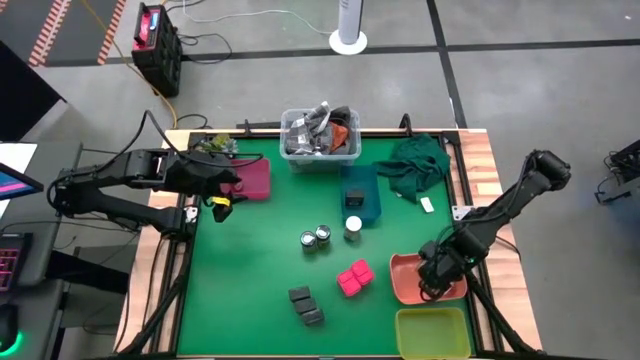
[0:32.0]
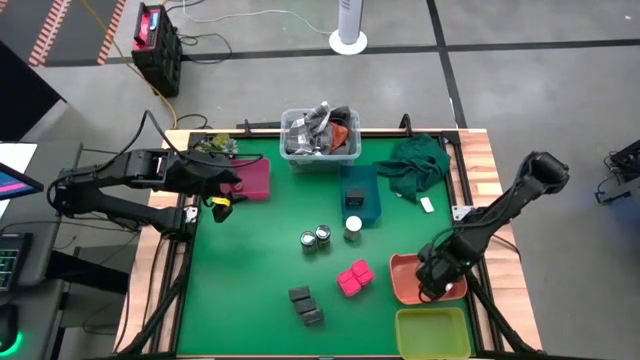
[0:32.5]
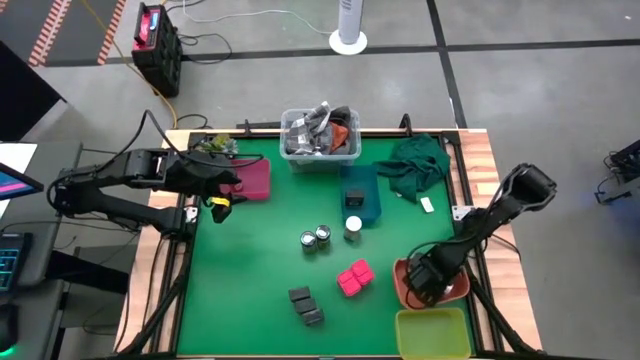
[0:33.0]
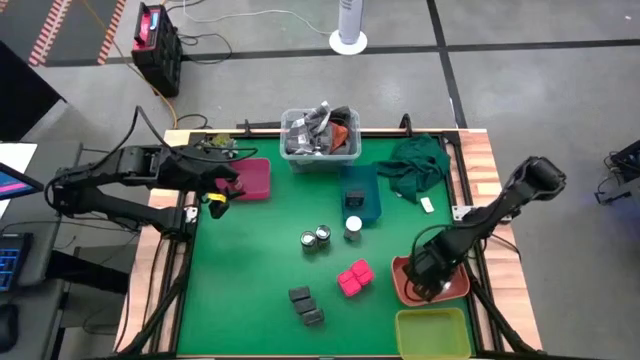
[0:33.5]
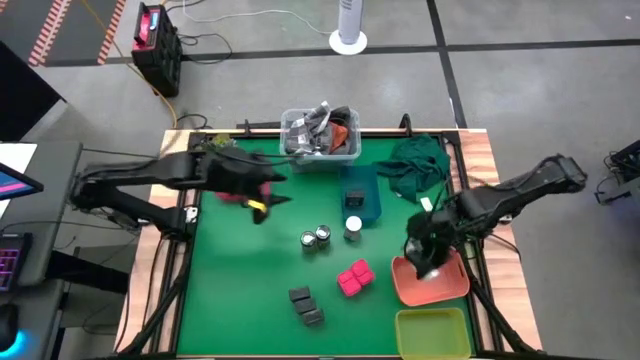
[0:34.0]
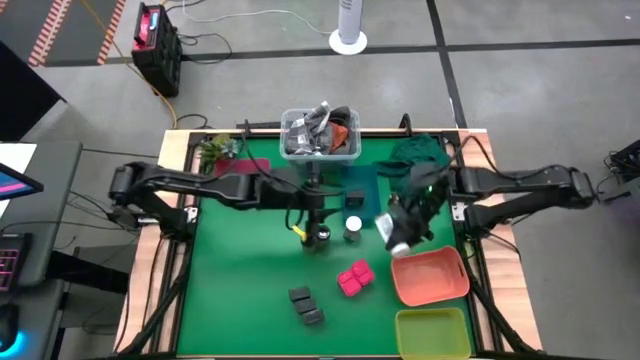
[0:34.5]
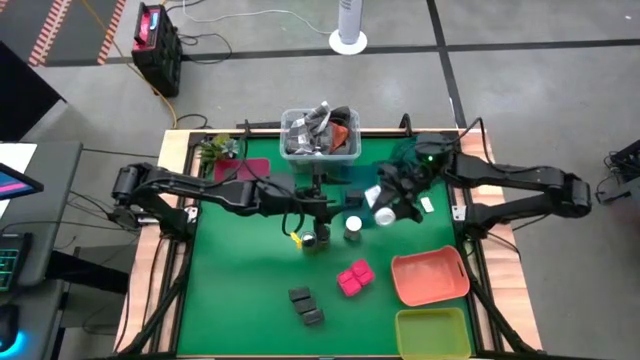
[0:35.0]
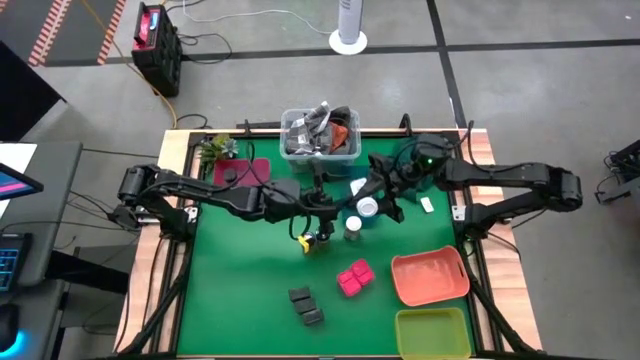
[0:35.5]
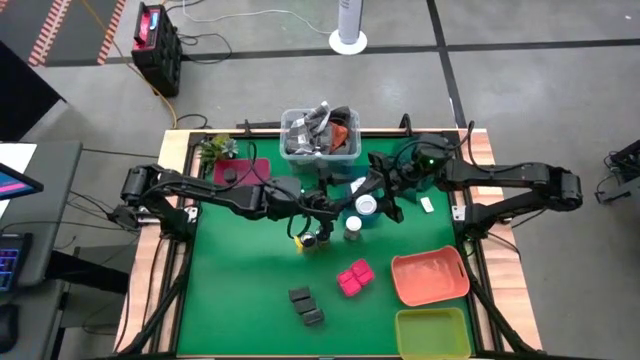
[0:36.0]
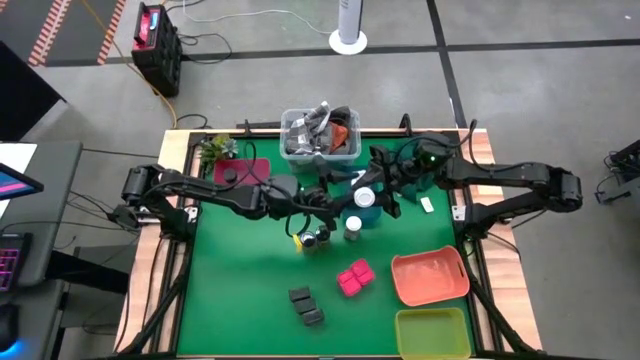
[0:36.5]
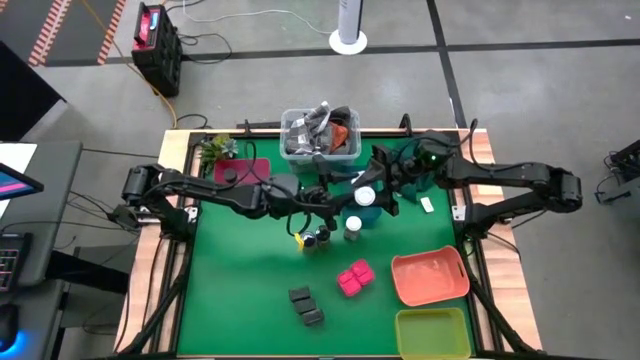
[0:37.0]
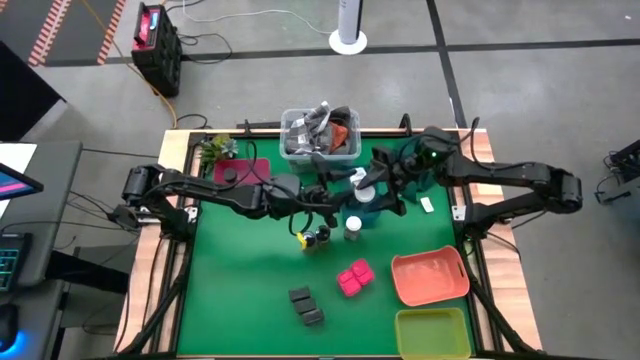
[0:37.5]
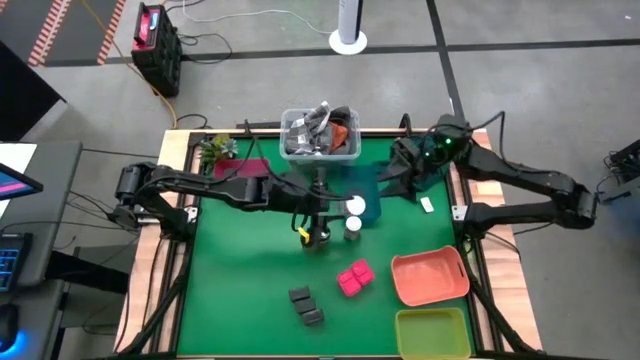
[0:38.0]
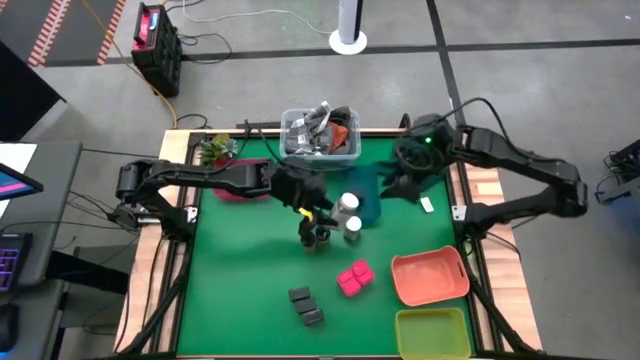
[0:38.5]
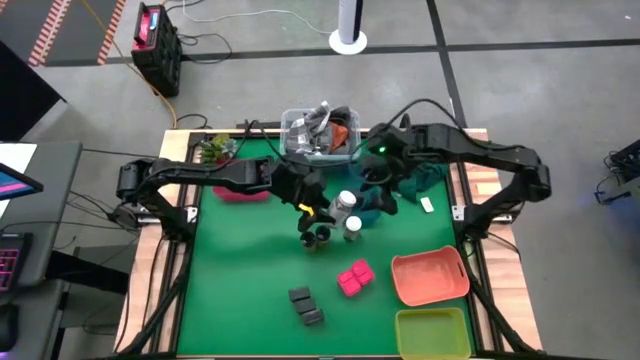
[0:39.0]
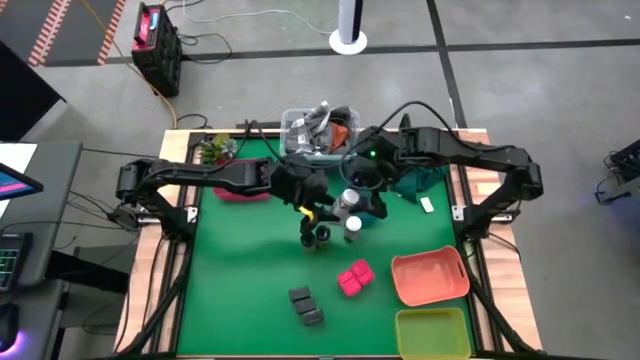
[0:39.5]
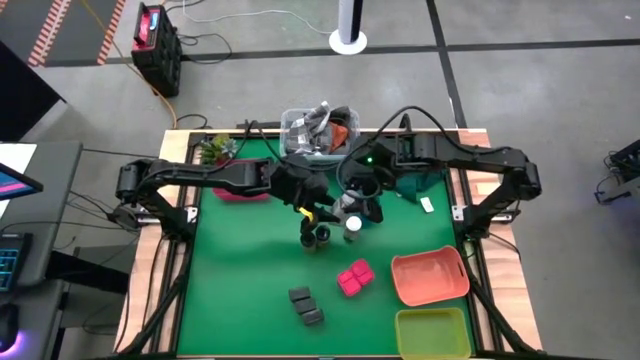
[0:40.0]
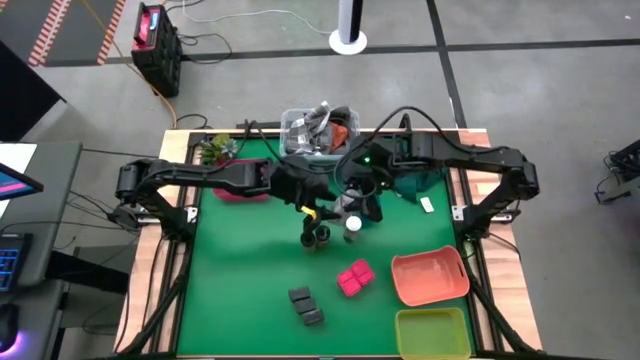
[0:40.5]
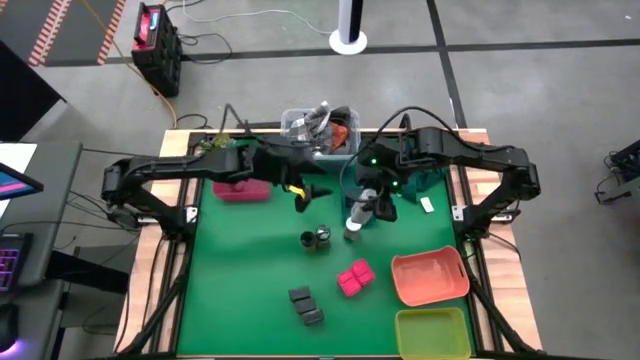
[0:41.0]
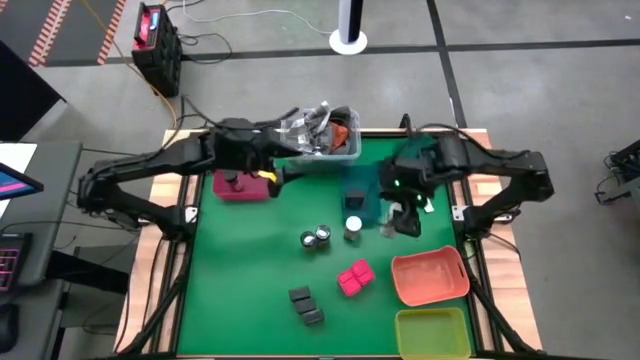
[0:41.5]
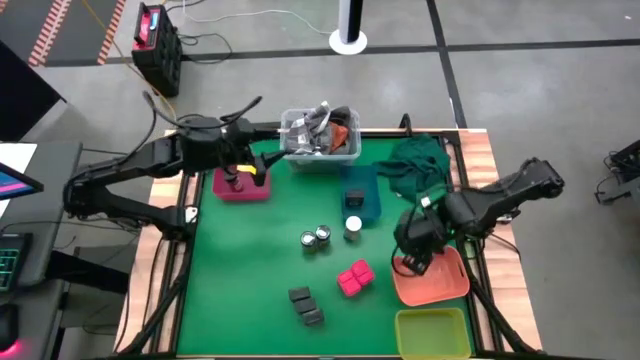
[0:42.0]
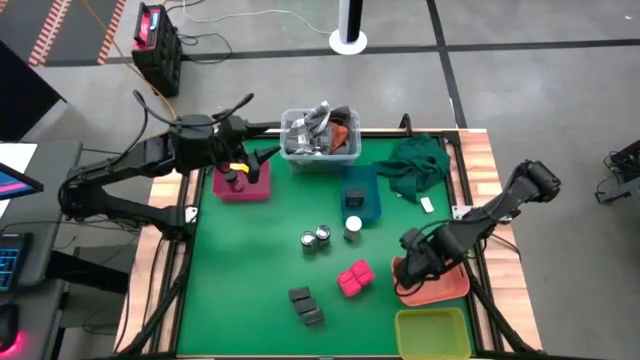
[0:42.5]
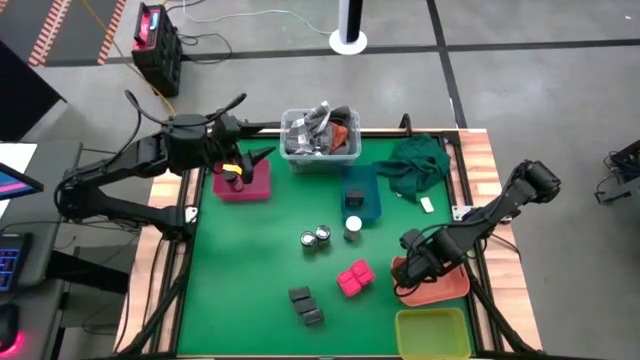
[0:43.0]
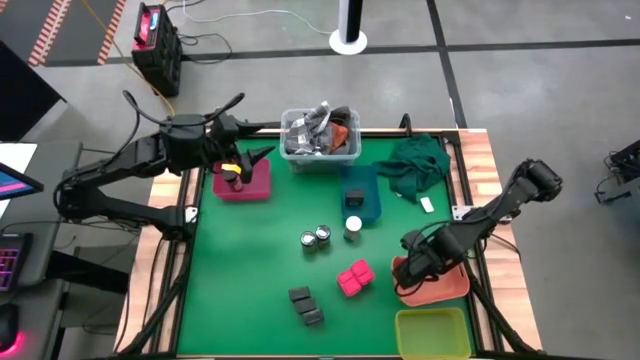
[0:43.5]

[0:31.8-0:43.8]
Task: Sort spices by type
Put the white seasoning bottle into the orange bin

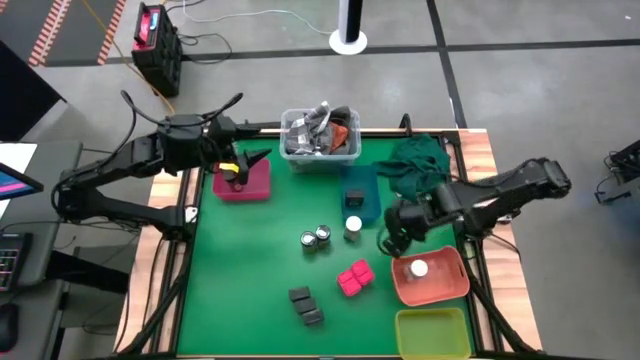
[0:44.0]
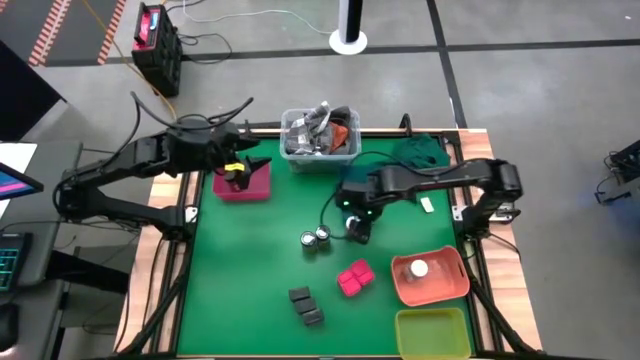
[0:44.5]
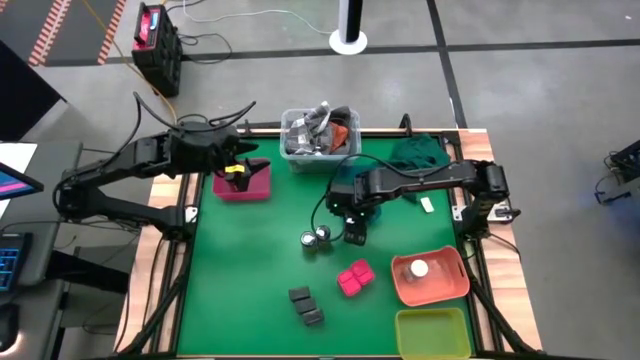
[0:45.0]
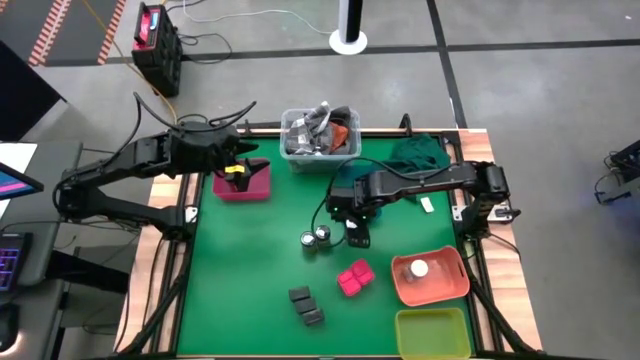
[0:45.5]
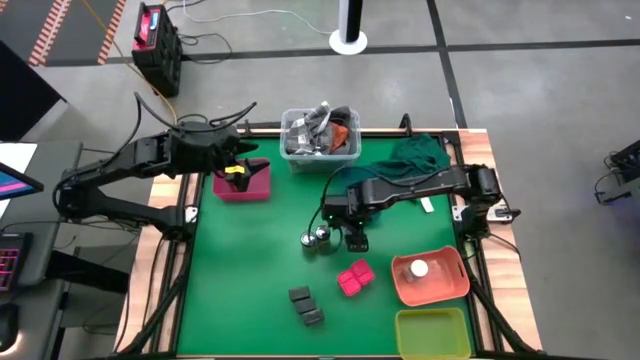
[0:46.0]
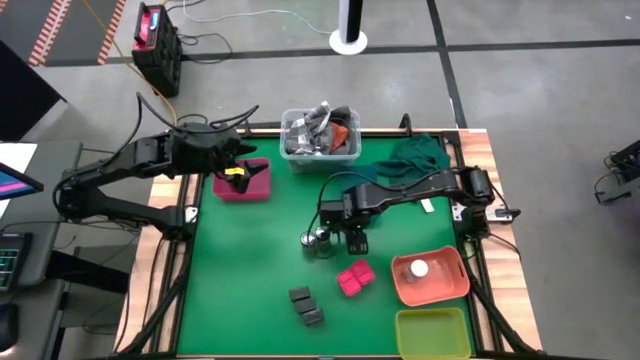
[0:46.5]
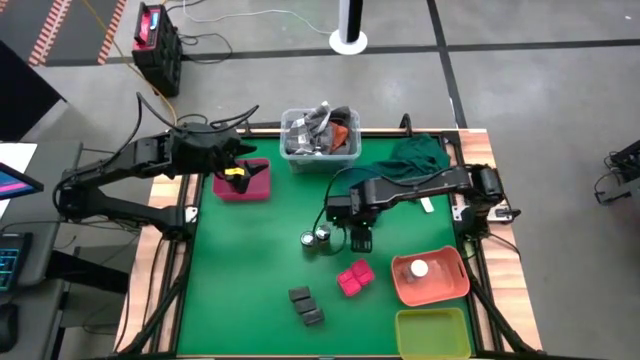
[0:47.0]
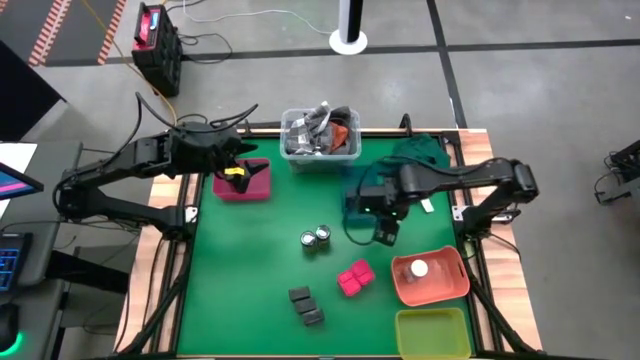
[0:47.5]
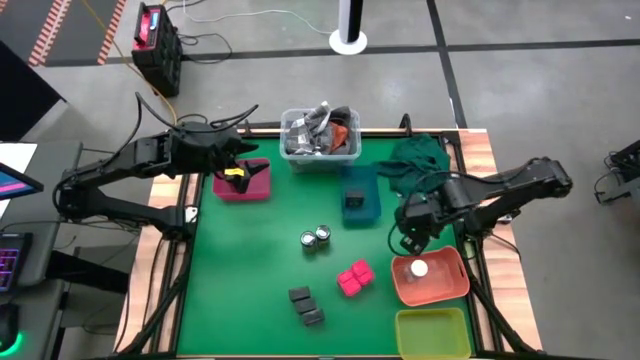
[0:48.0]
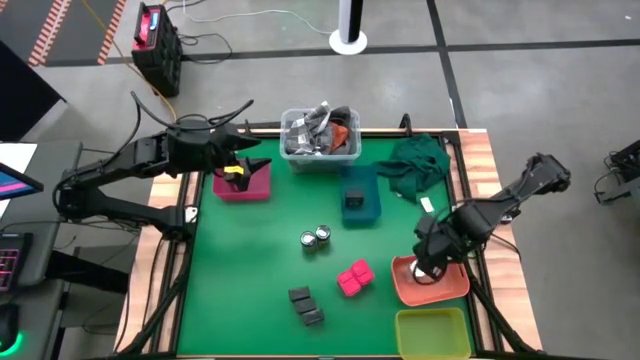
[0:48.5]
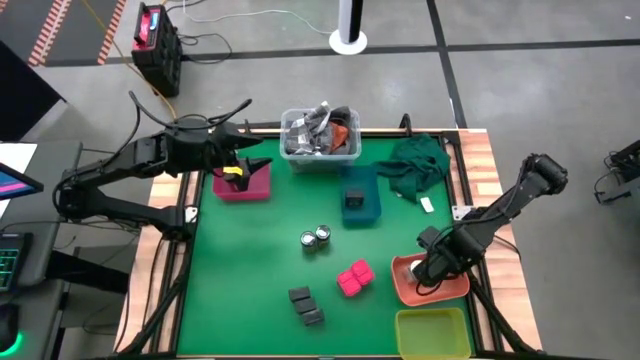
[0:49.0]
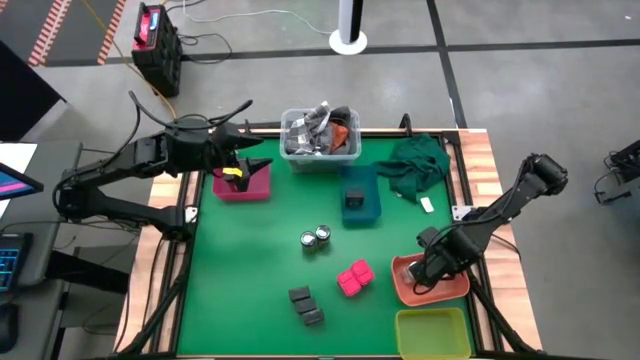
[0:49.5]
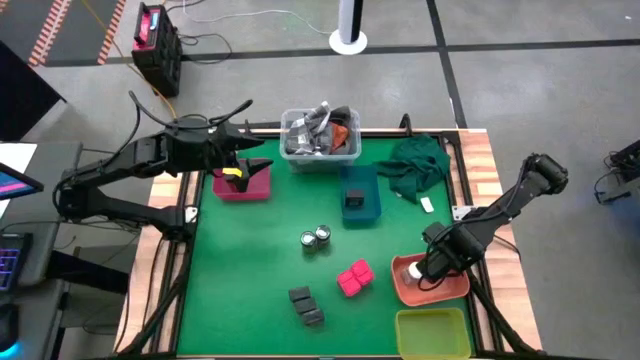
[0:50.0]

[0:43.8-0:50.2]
Put the white seasoning bottle into the orange bin

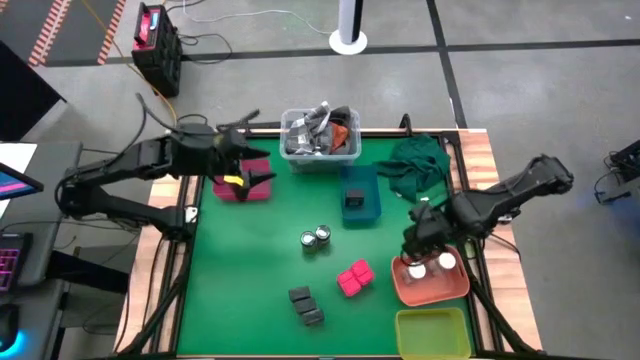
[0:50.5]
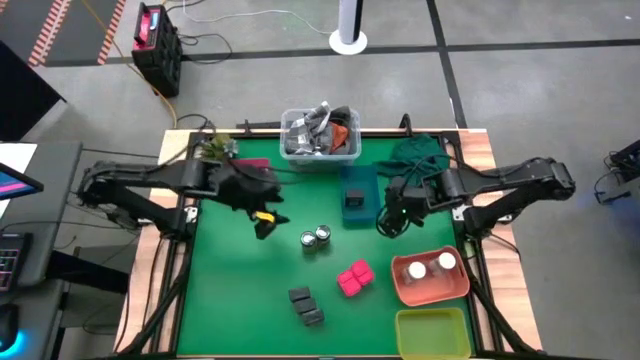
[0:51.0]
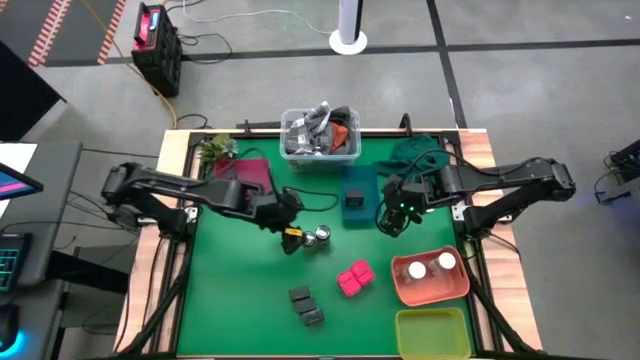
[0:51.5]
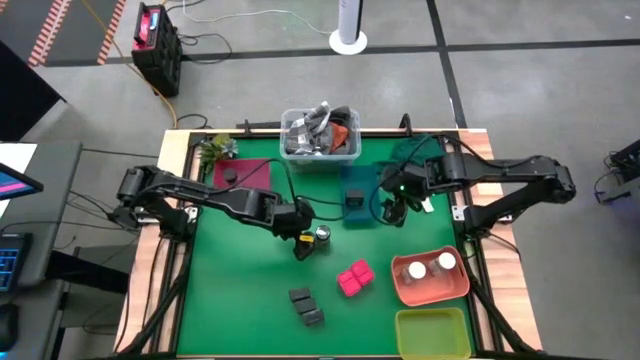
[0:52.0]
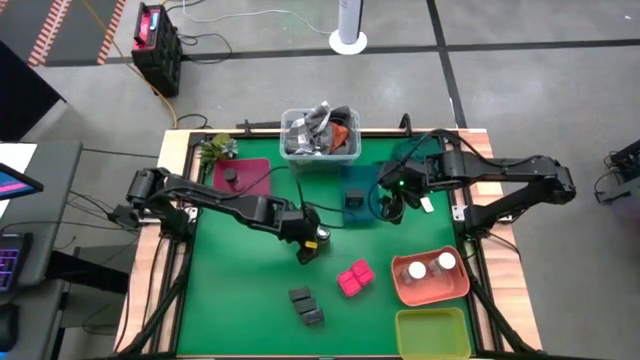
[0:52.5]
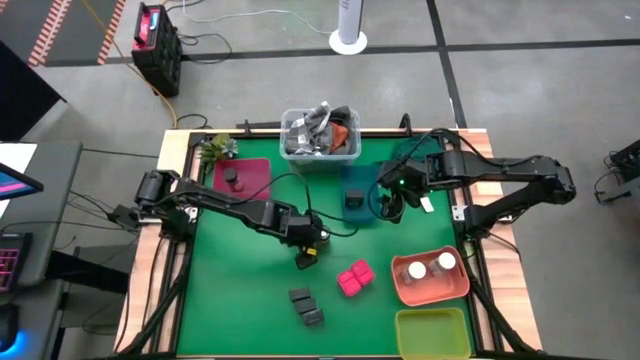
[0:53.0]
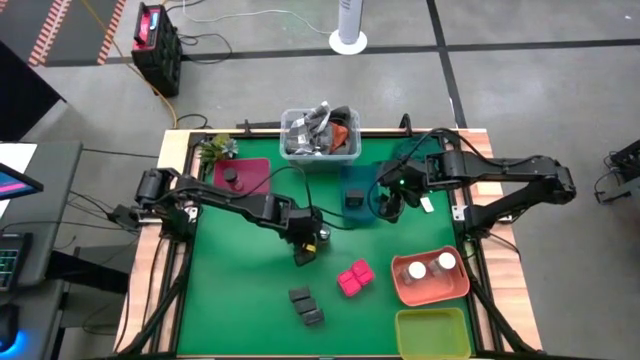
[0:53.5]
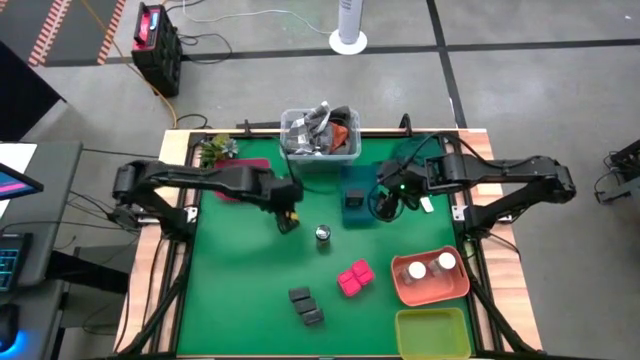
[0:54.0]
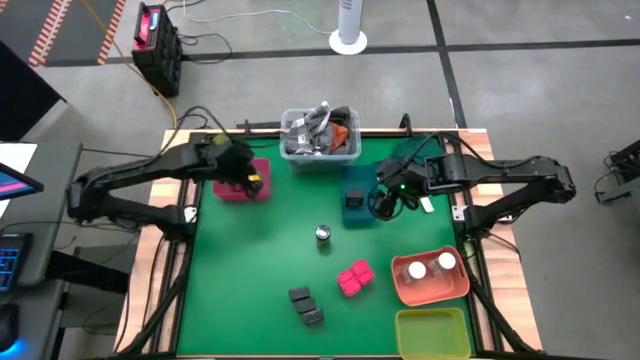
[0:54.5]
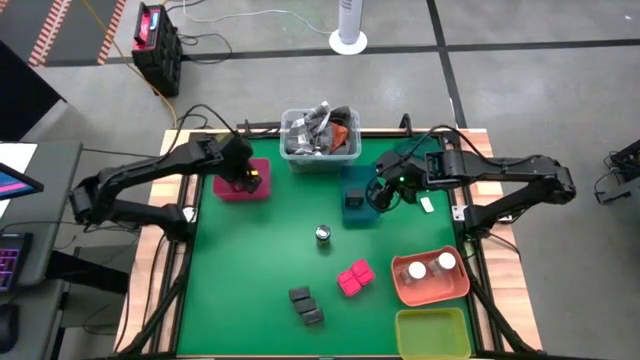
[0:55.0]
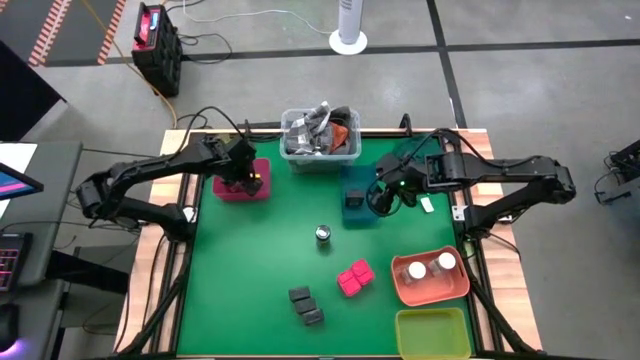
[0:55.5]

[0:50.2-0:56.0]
Put the black seasoning bottle into the pink bin
